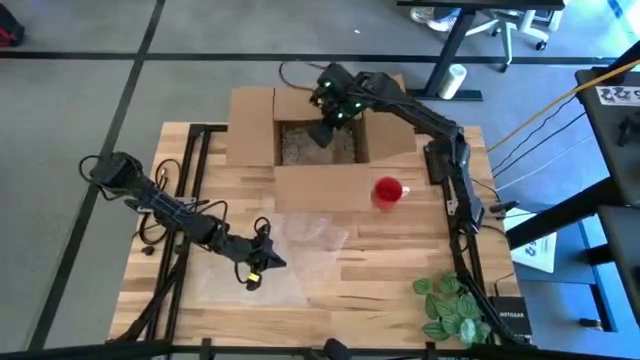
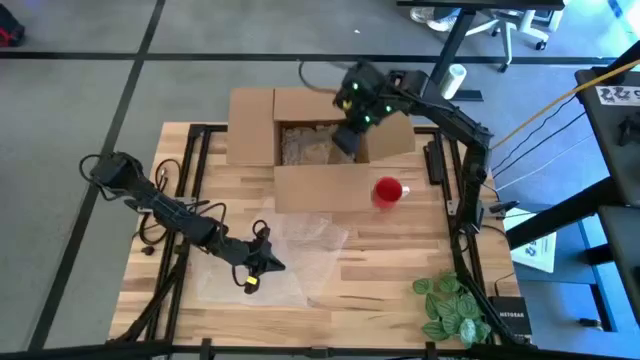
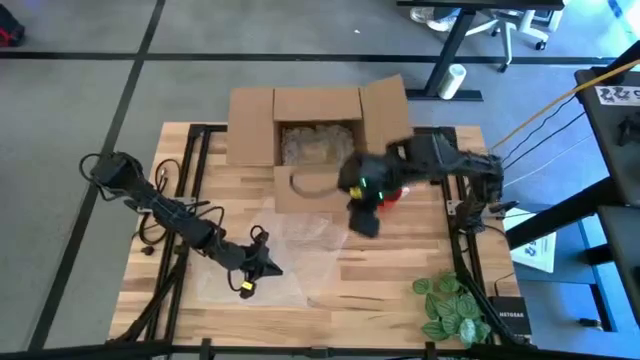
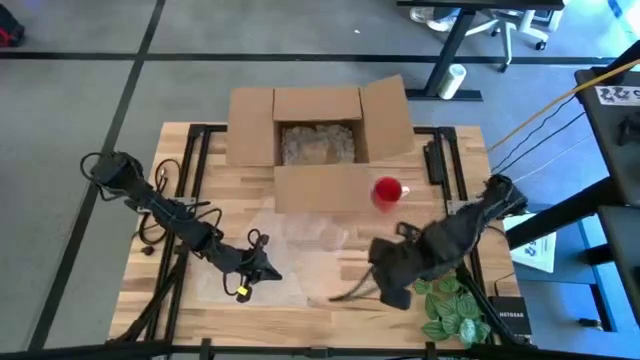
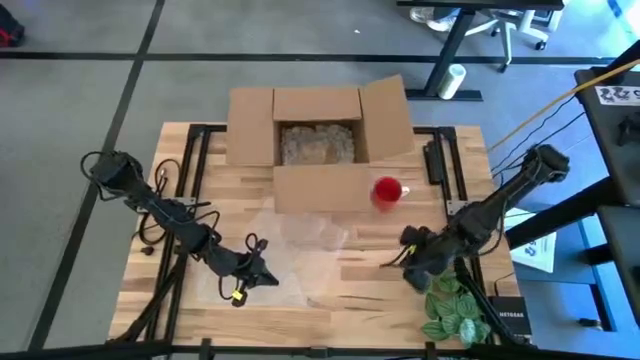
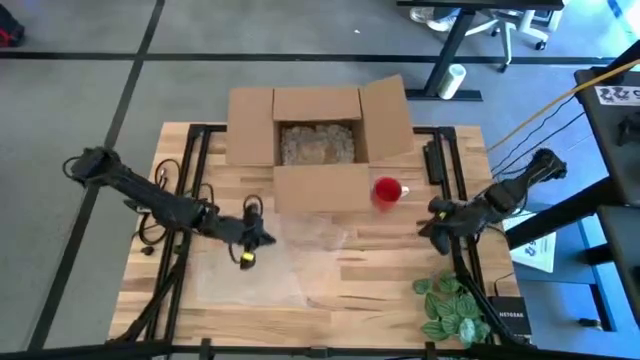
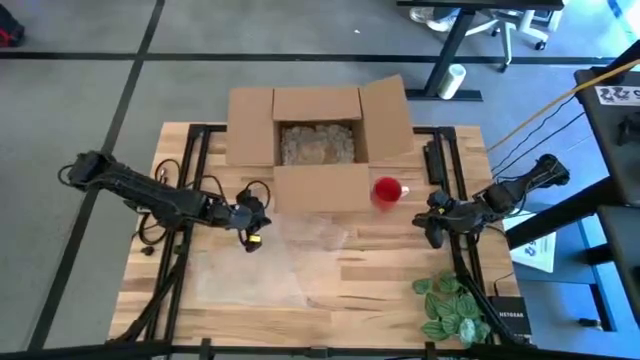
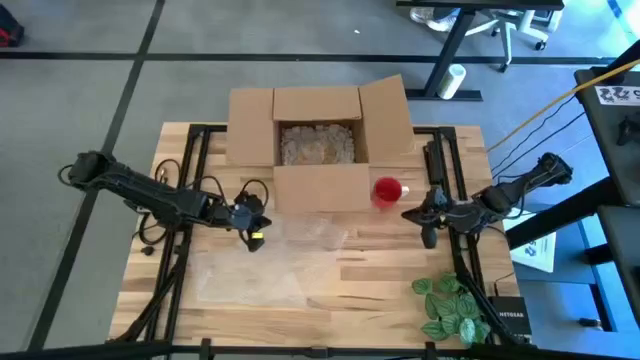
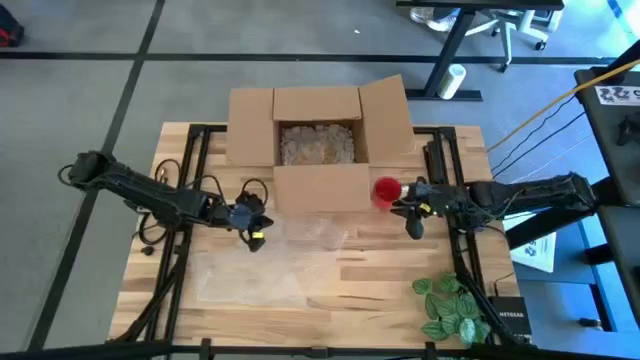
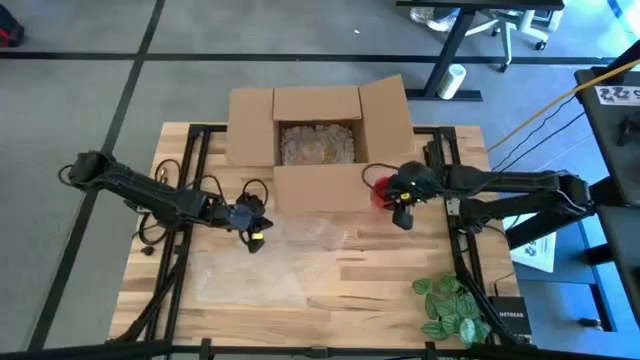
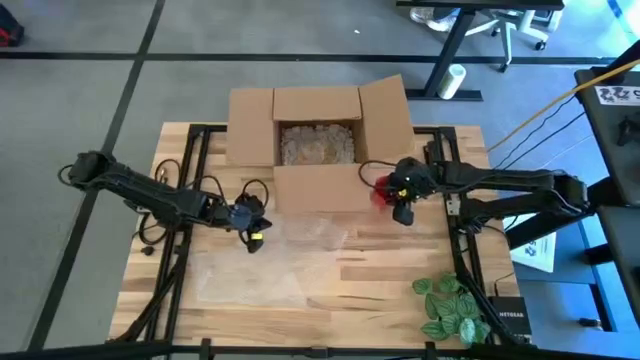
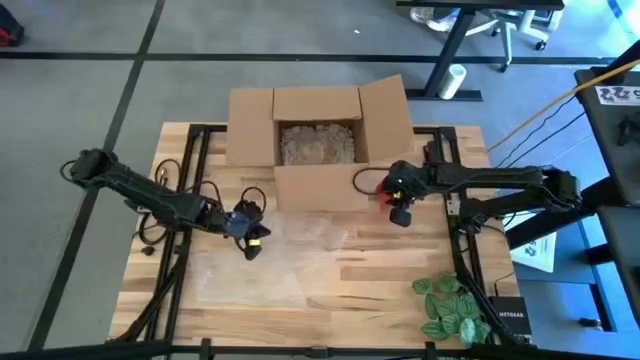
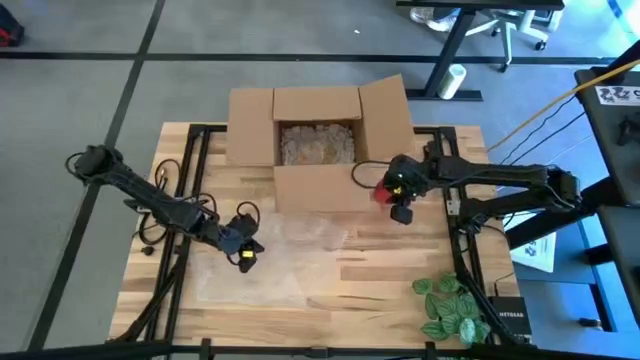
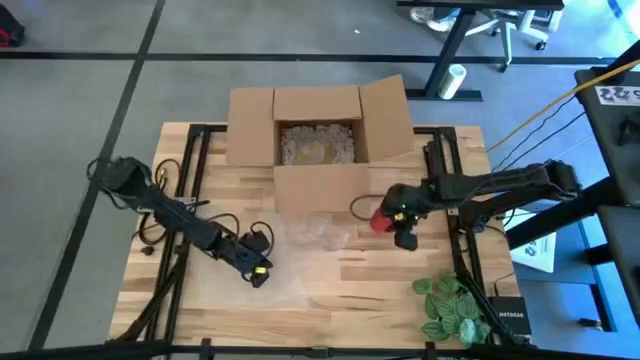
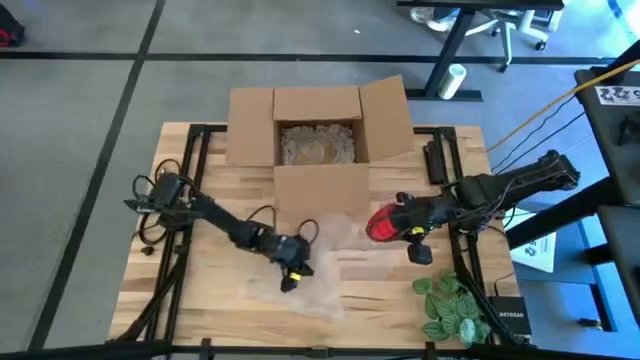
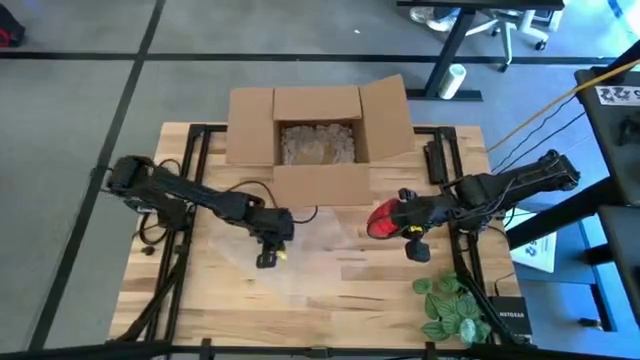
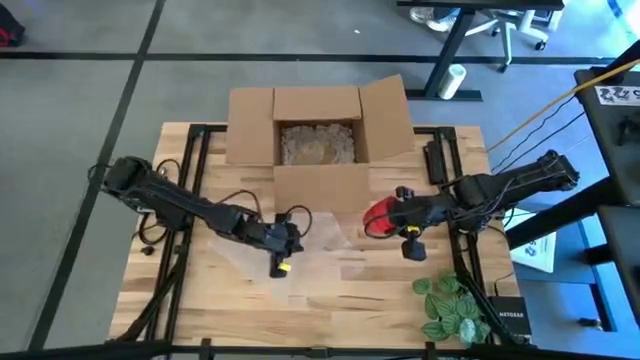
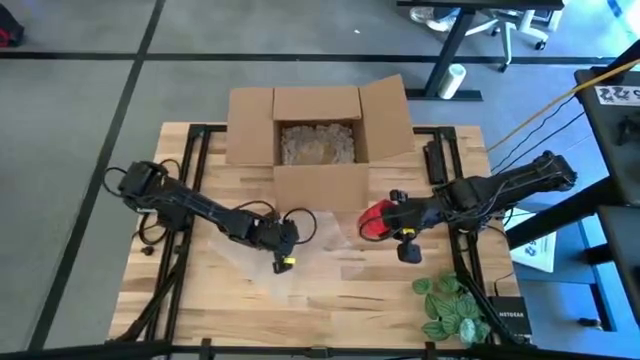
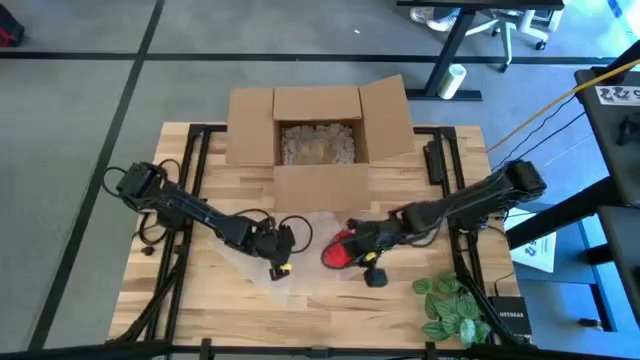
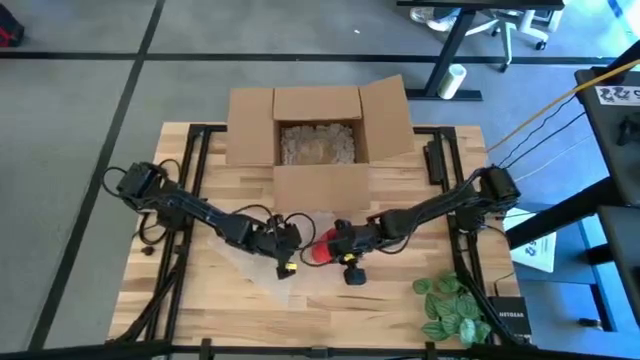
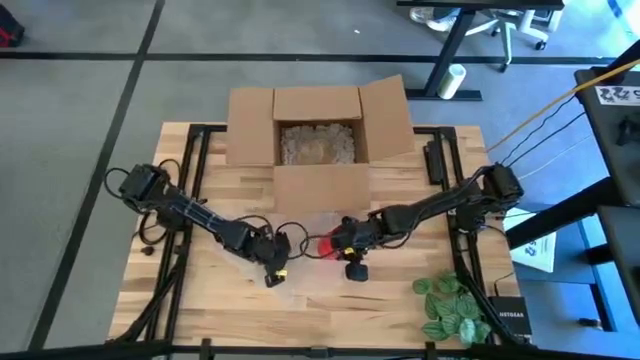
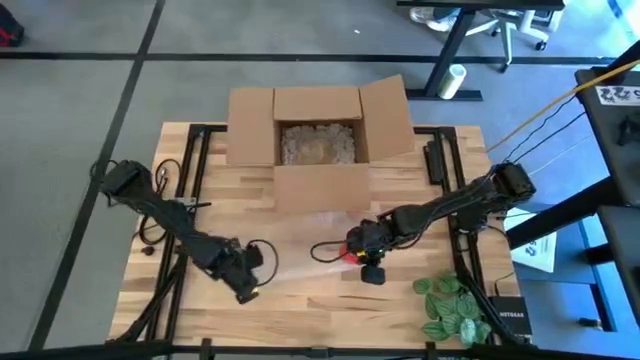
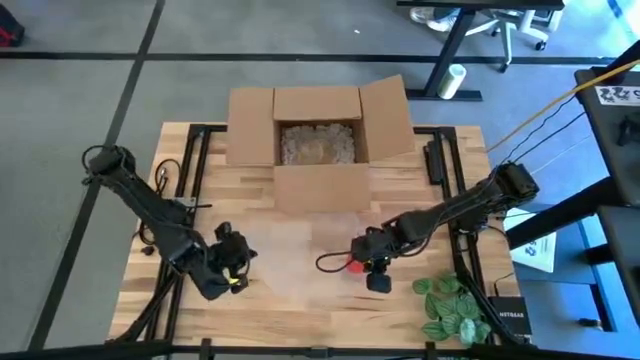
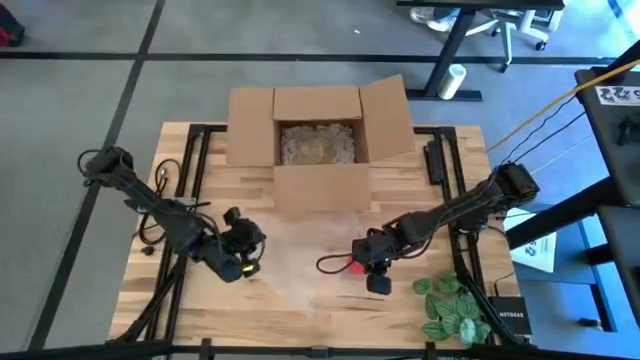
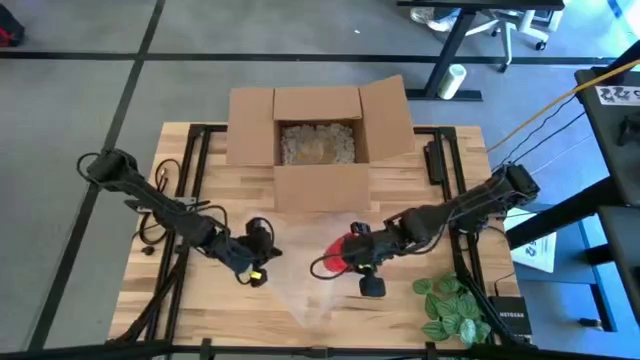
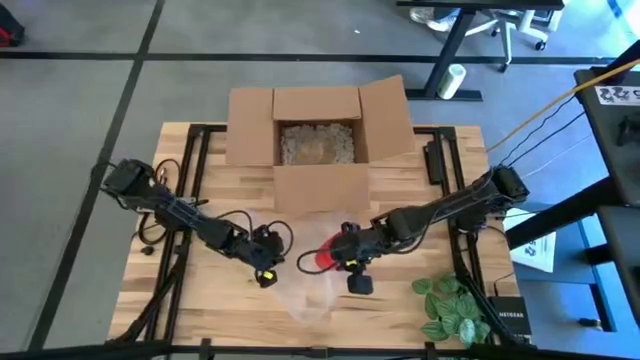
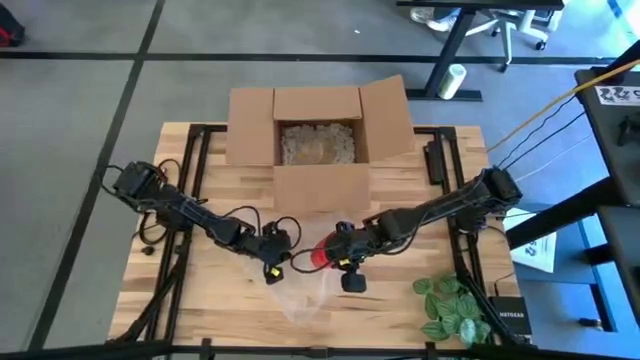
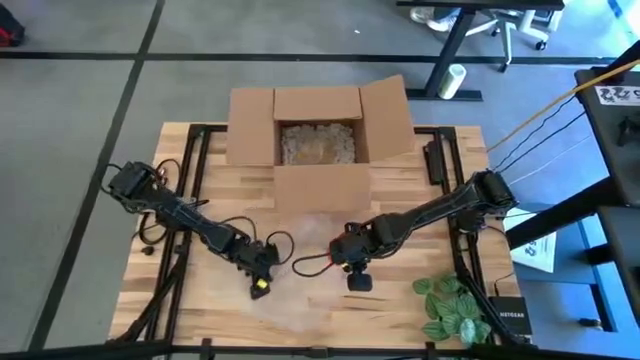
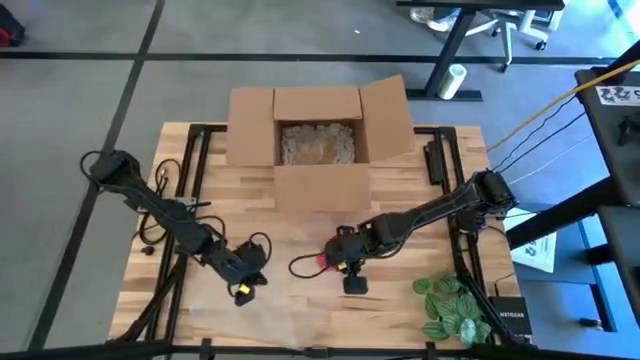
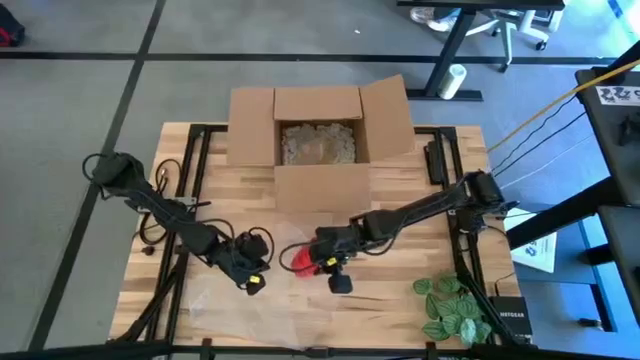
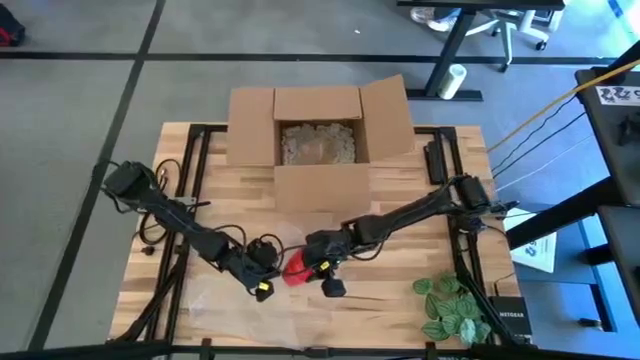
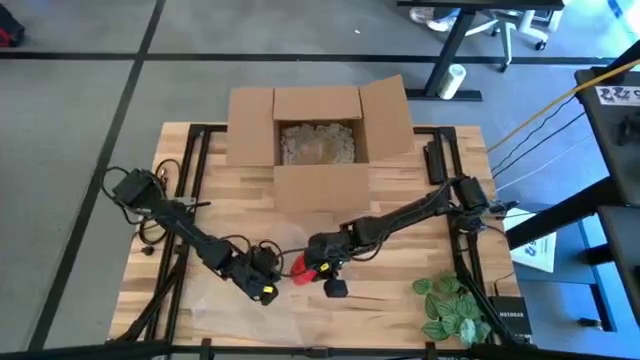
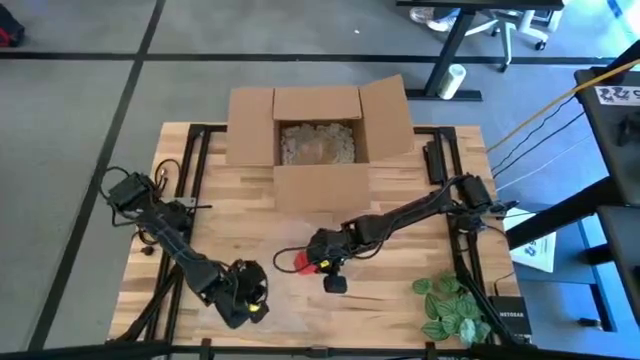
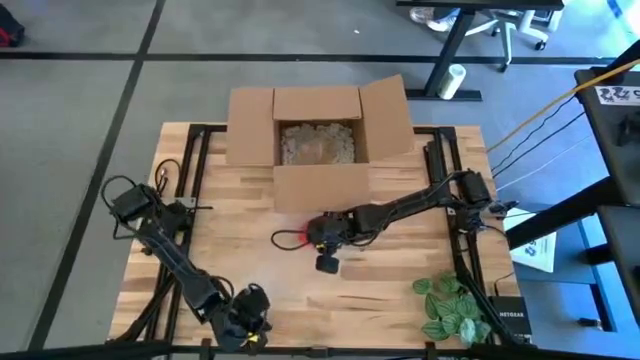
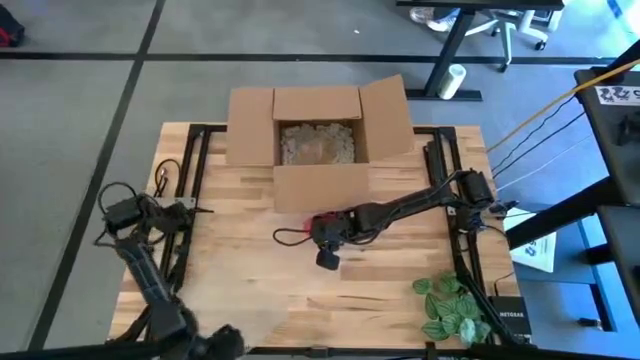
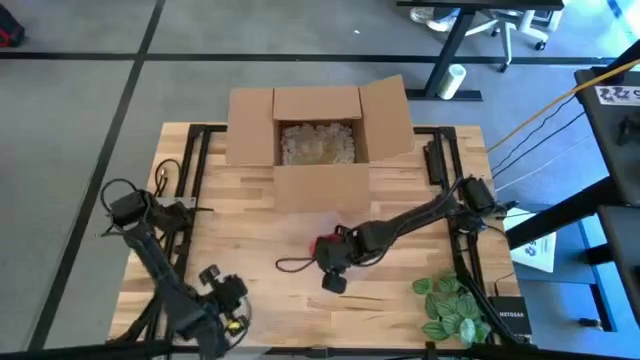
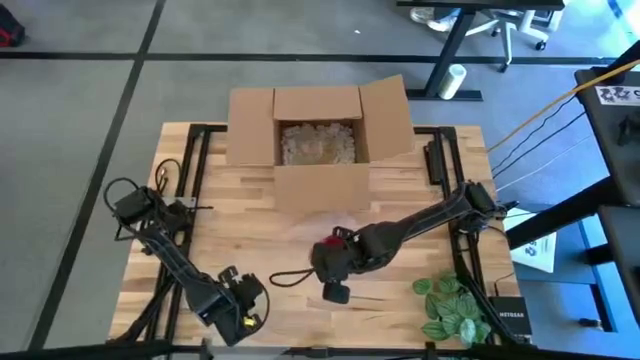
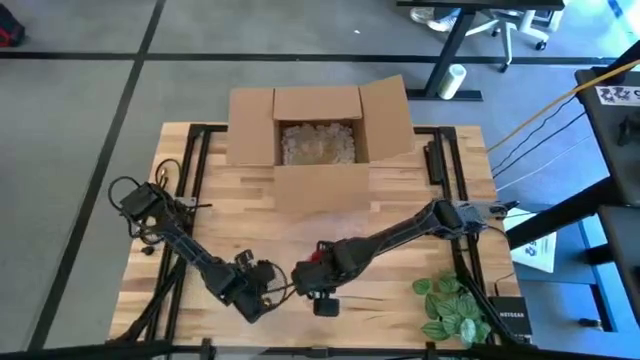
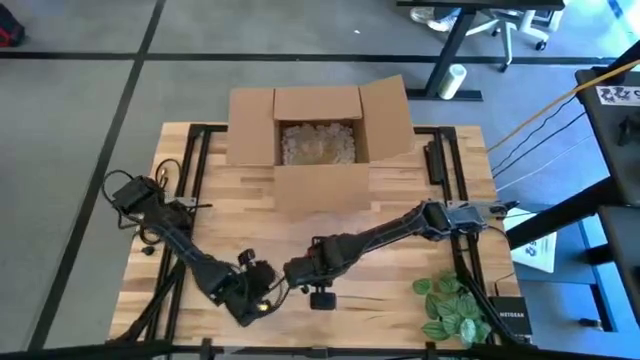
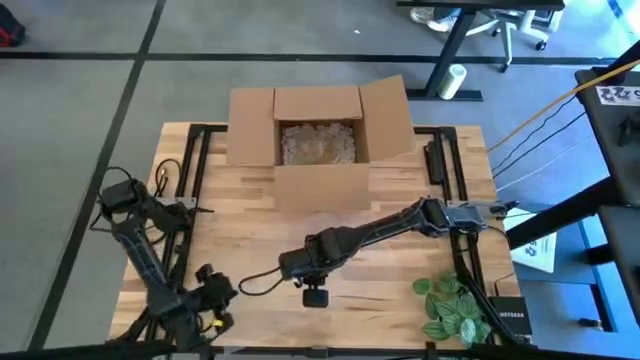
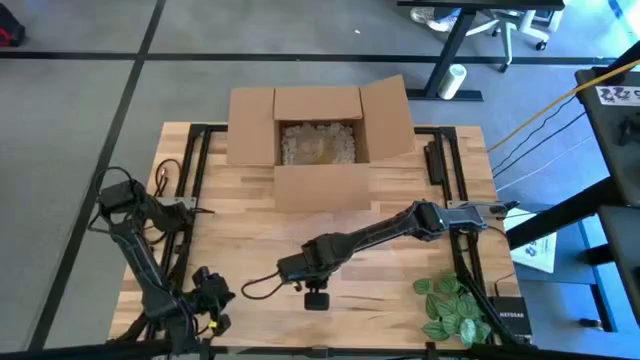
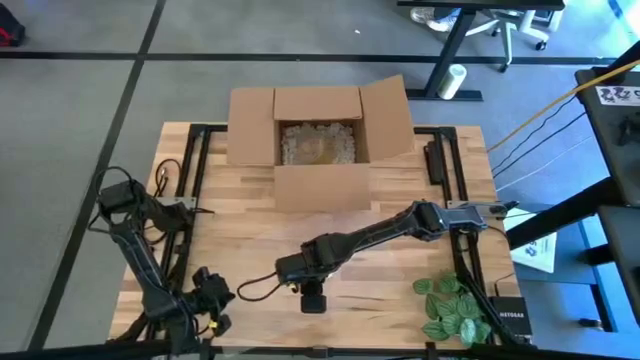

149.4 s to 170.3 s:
Task: wrap mug
Wrap the red mug using the bubble wrap
